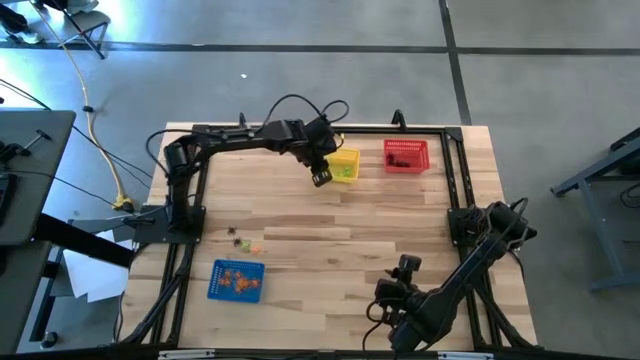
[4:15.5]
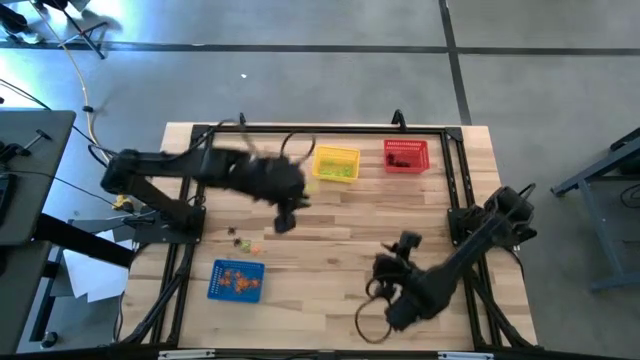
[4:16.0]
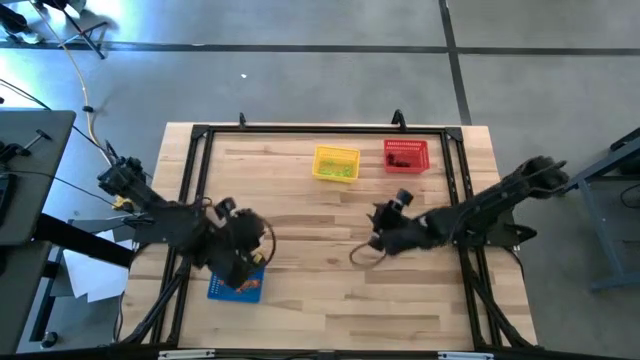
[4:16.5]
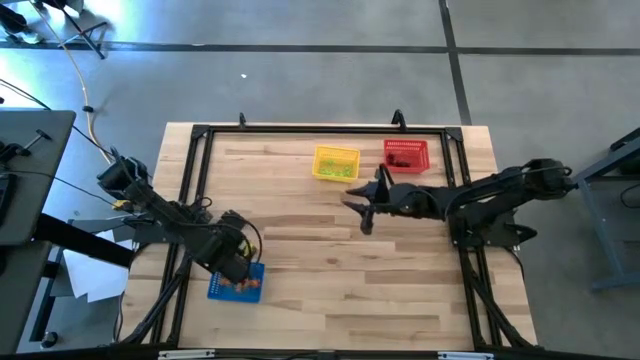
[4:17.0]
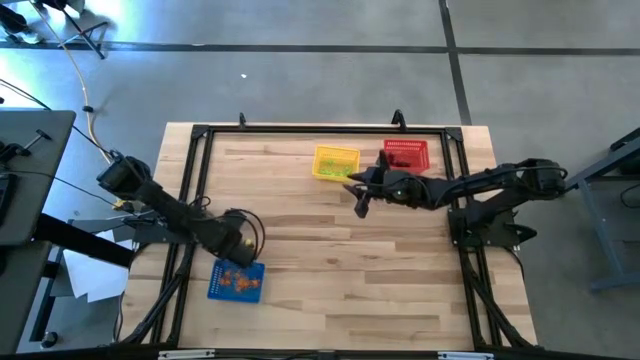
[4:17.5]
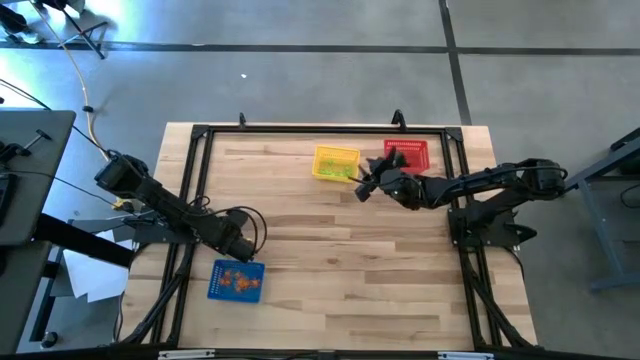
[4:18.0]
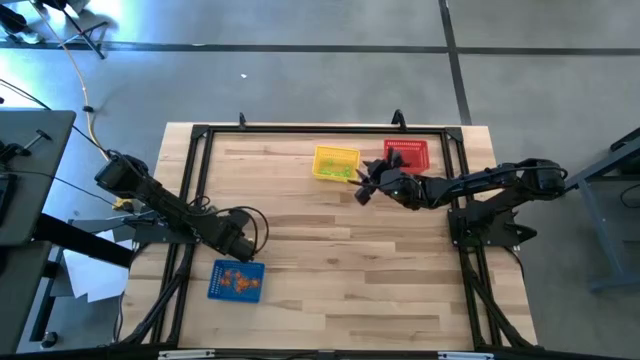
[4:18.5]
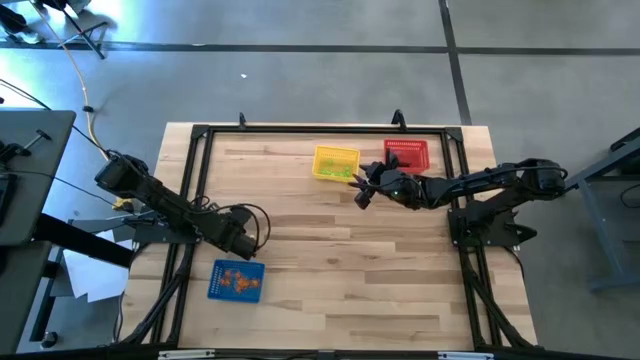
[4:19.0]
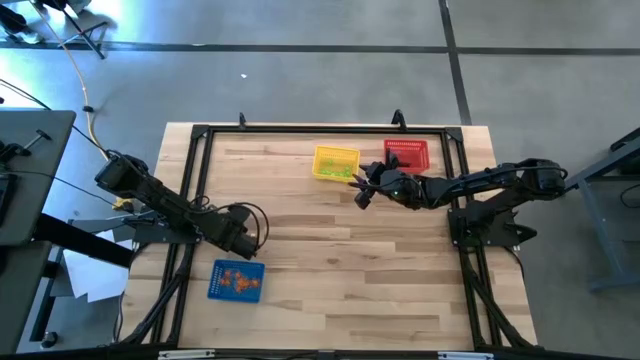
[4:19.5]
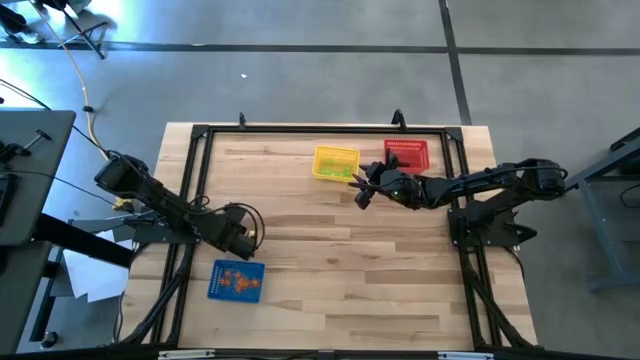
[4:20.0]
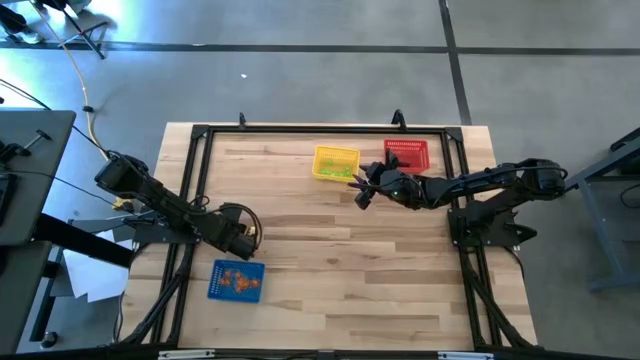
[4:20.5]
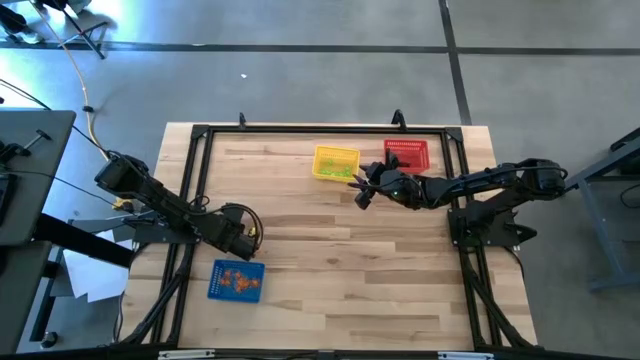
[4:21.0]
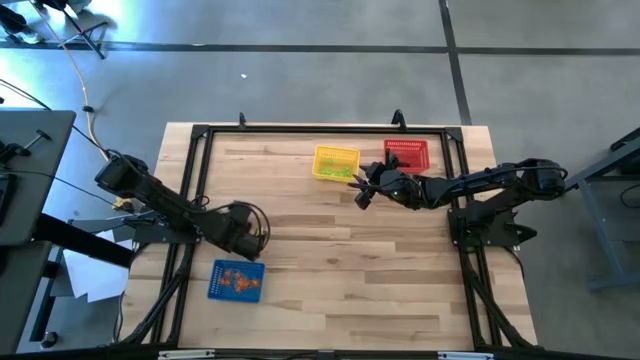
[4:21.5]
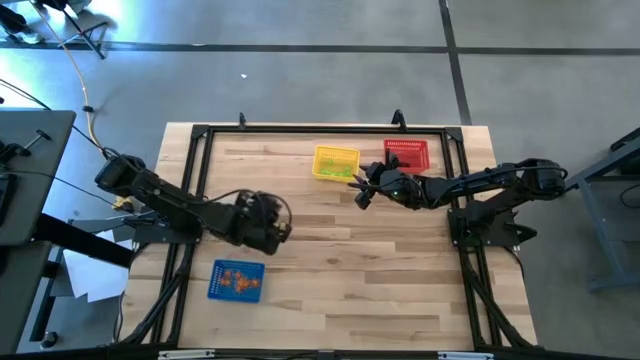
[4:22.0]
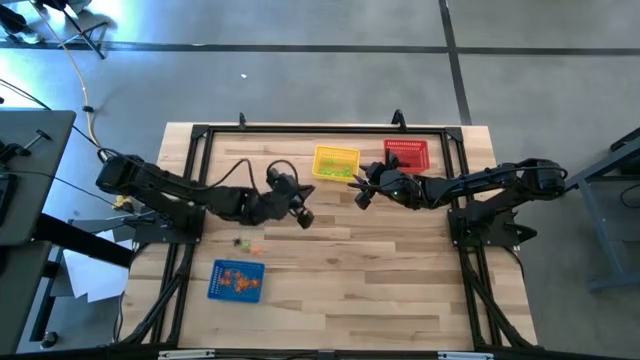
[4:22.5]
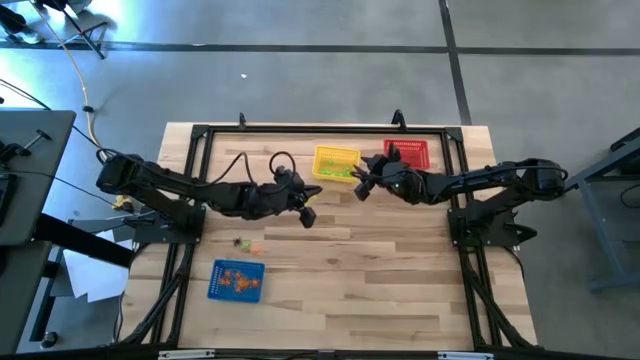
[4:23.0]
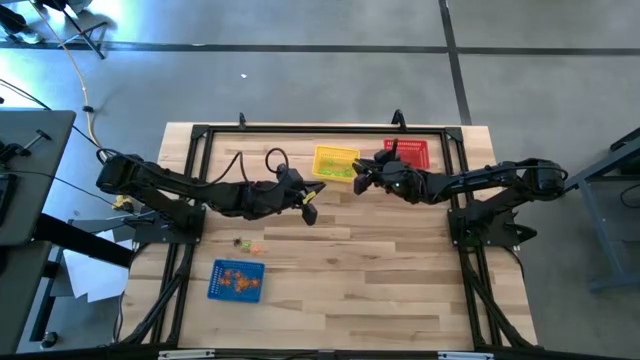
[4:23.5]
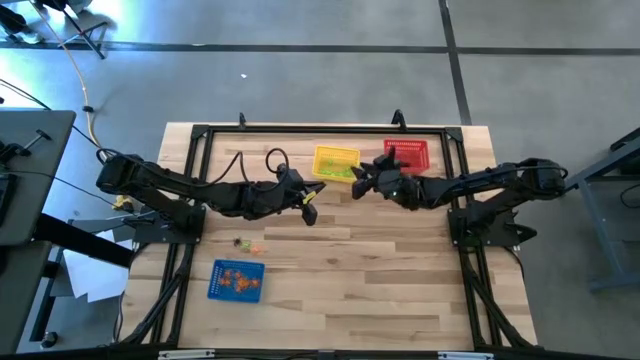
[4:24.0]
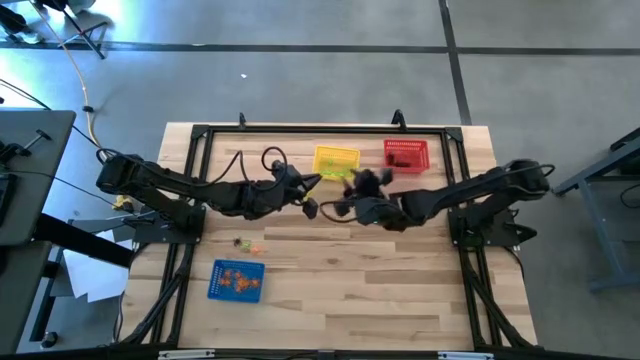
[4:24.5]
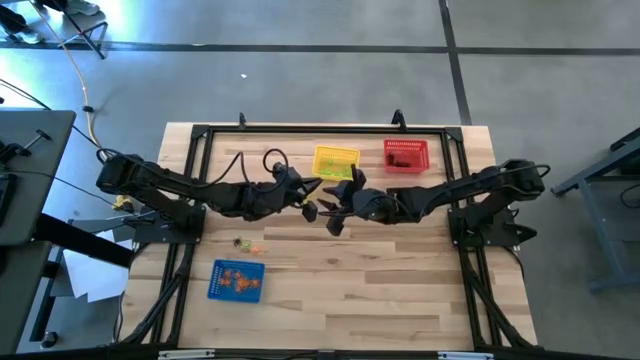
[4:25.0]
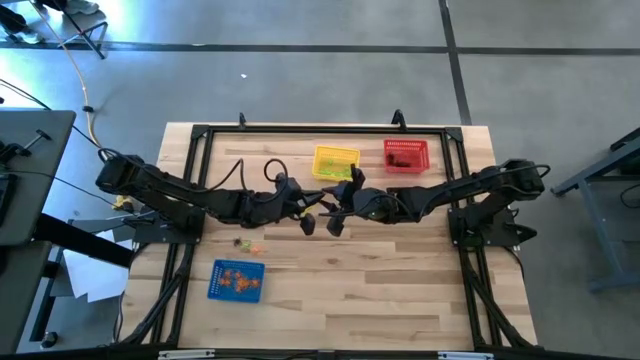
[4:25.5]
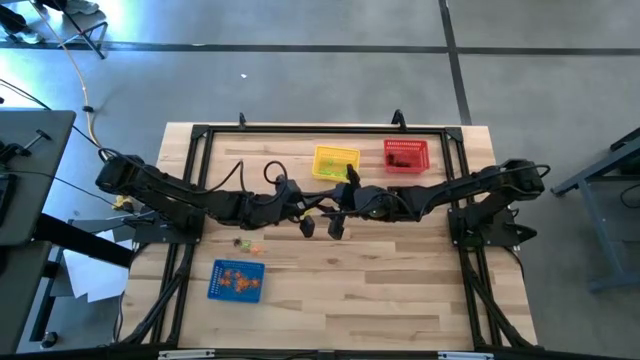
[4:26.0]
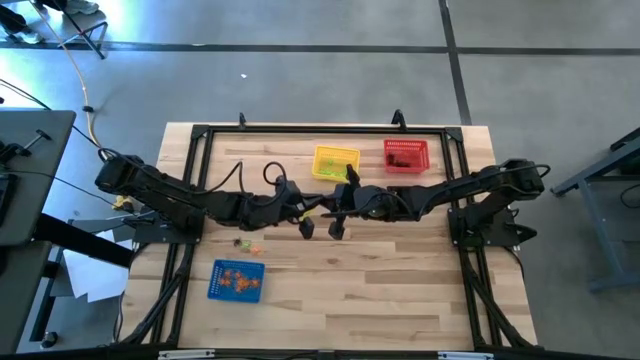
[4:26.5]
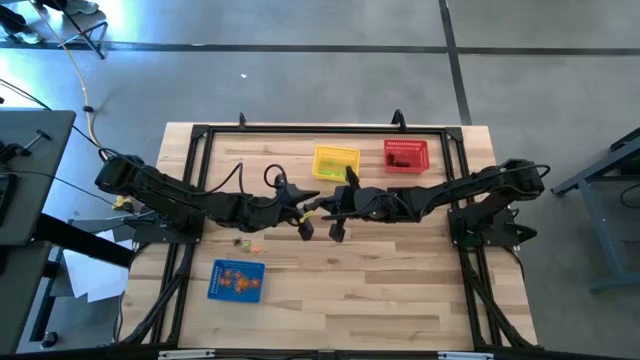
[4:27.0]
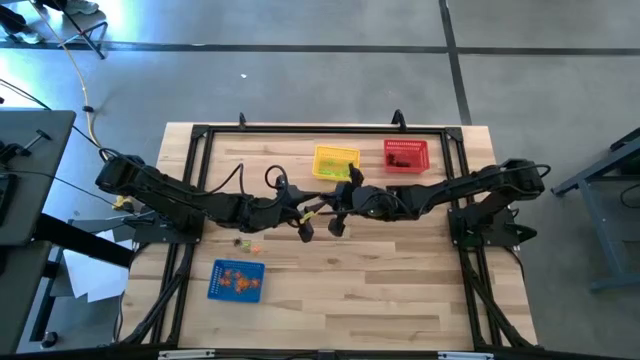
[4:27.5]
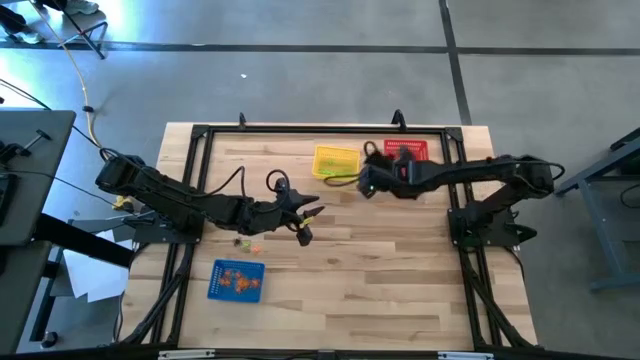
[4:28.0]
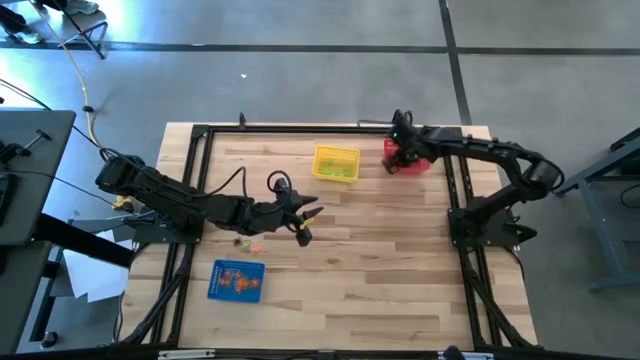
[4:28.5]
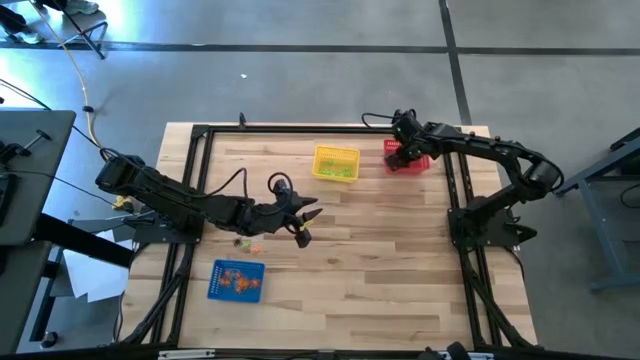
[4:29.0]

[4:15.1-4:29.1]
Task: Sort Halloween decoration
Put the black spider toy into the red bin

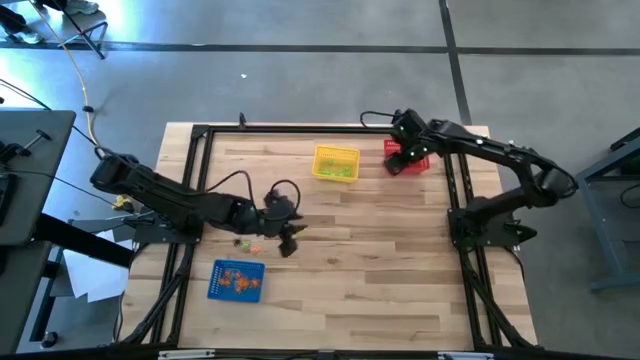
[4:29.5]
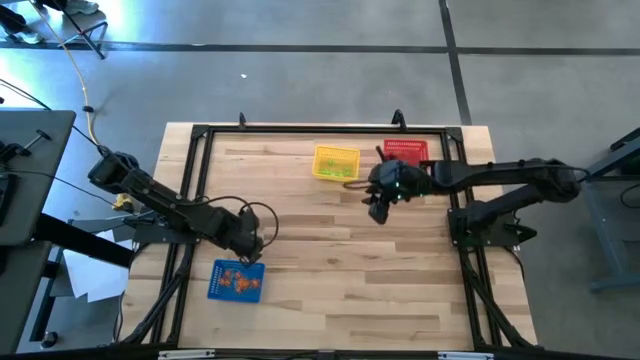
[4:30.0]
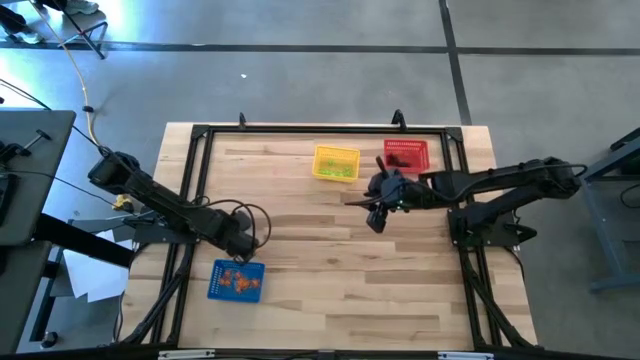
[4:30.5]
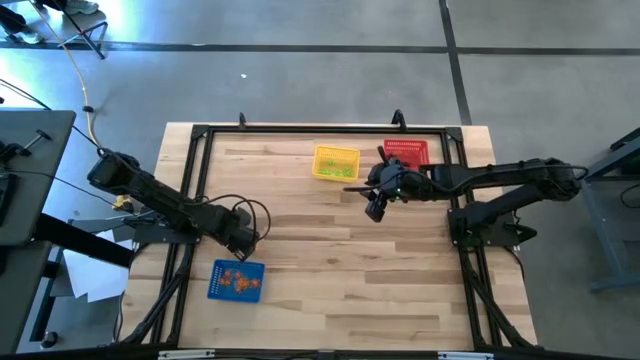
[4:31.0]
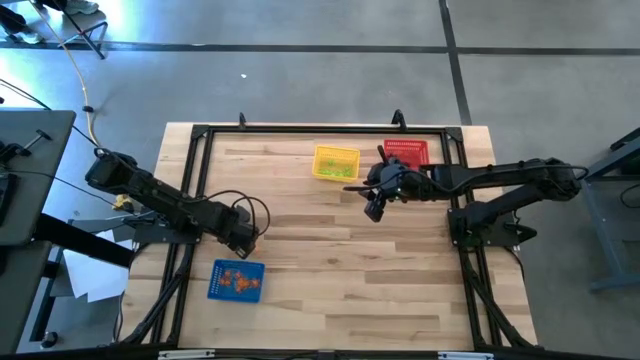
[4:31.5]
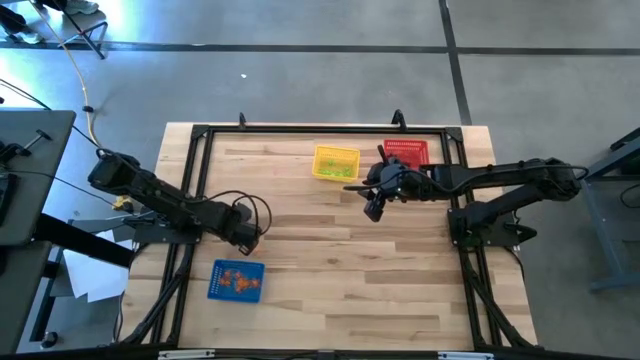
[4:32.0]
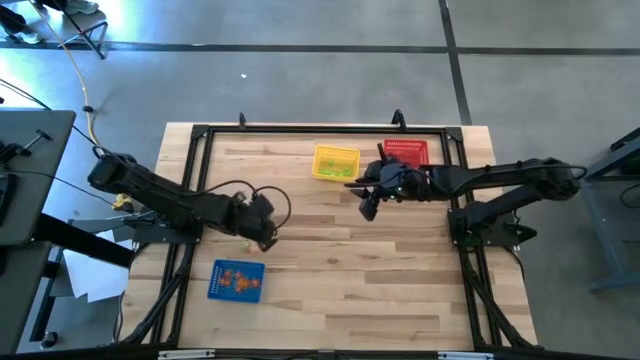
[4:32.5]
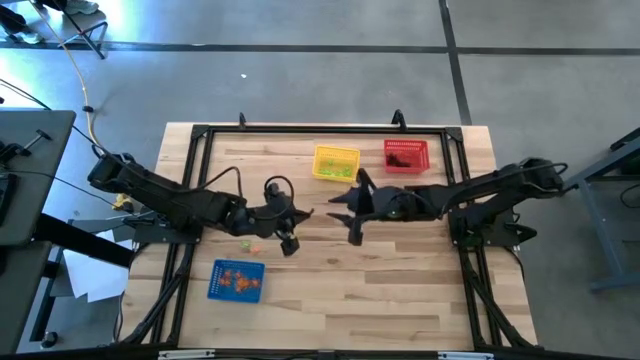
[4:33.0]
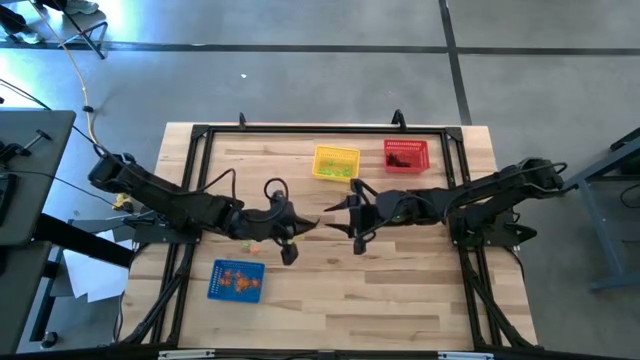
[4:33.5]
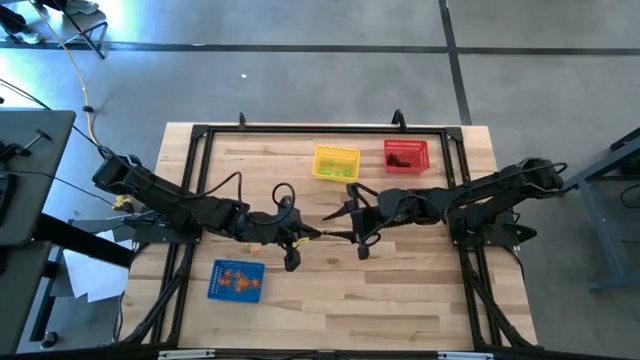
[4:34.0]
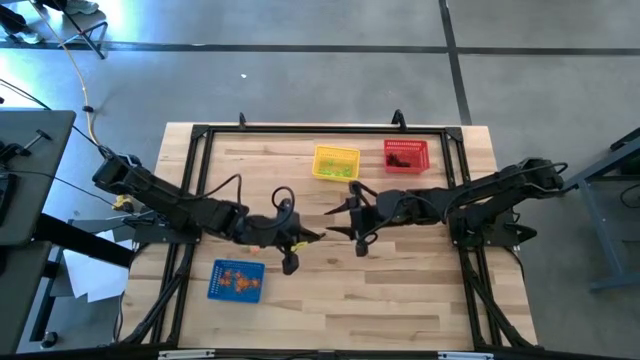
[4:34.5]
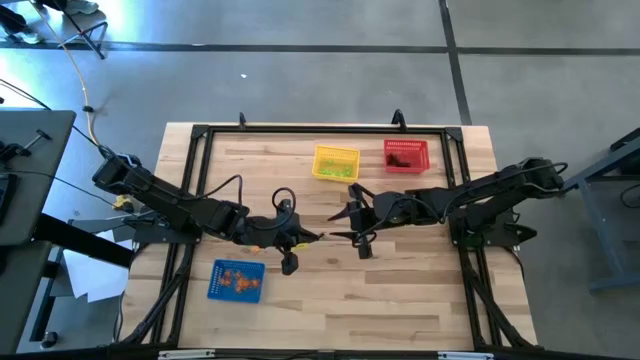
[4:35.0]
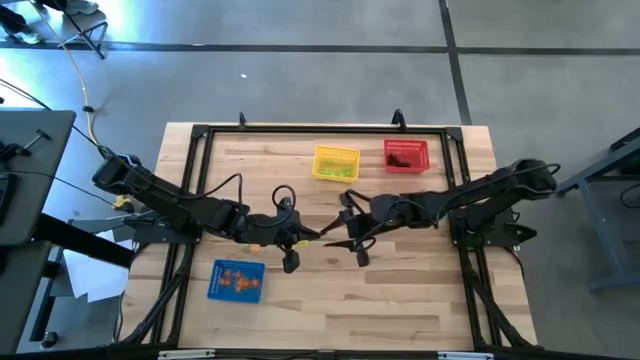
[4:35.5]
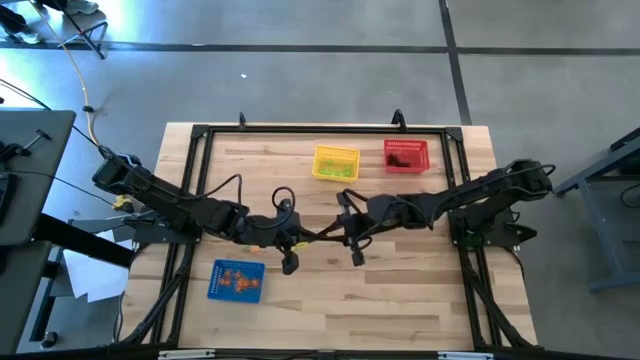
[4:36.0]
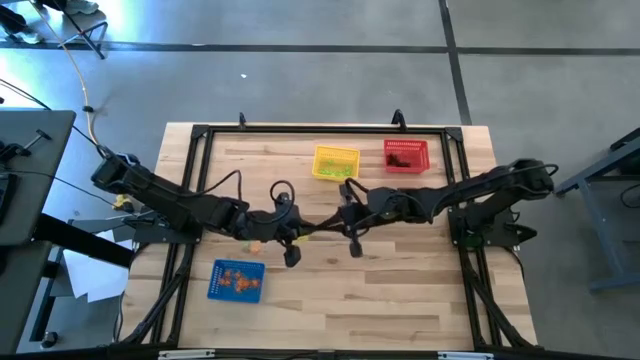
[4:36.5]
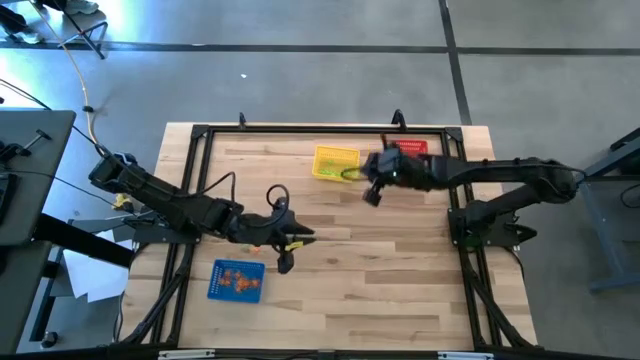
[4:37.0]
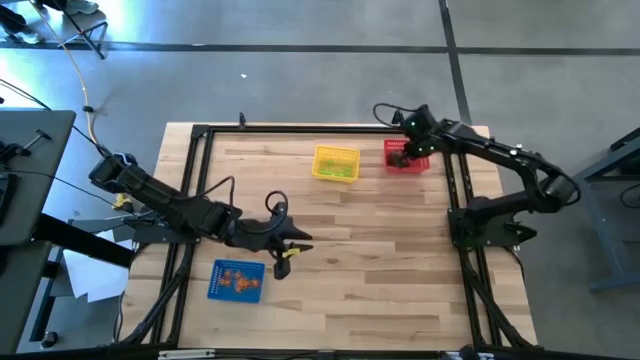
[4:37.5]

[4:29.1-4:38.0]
Put the black spider toy into the red bin

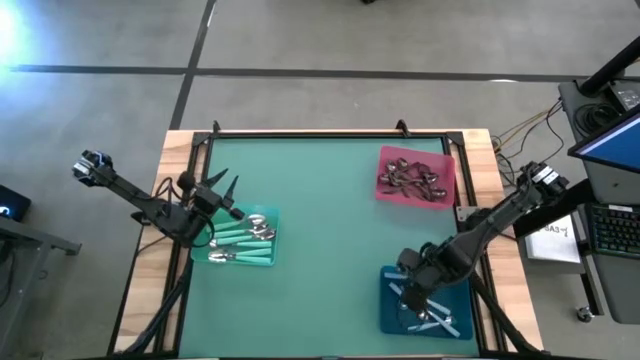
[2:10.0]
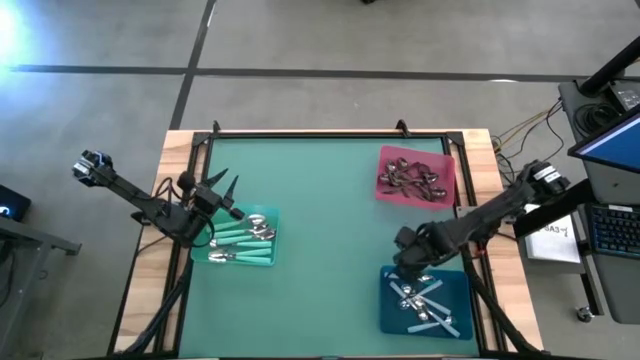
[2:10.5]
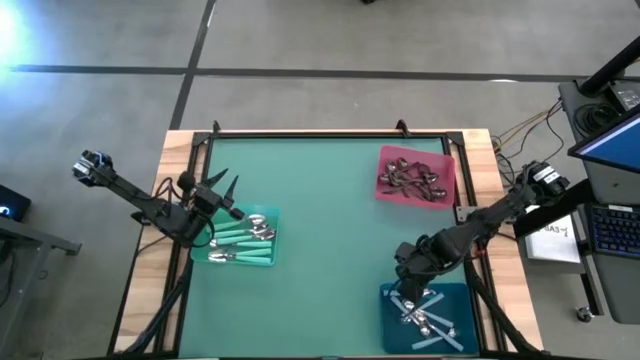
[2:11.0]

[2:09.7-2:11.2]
Task: Sort silverware by color (type)
Adjust the blue bin
